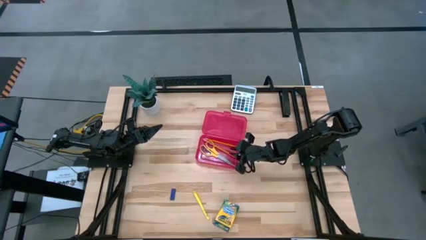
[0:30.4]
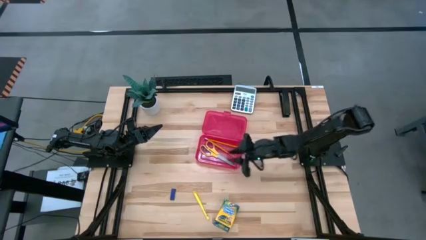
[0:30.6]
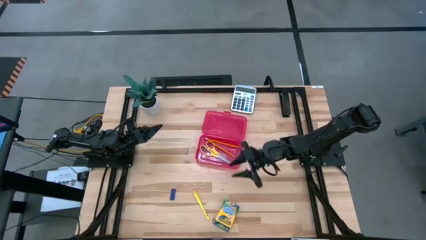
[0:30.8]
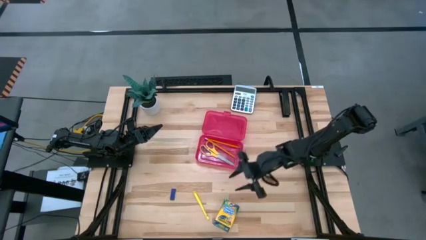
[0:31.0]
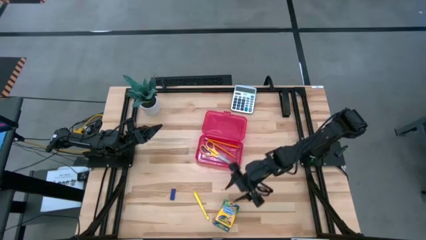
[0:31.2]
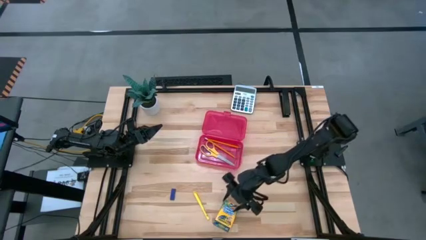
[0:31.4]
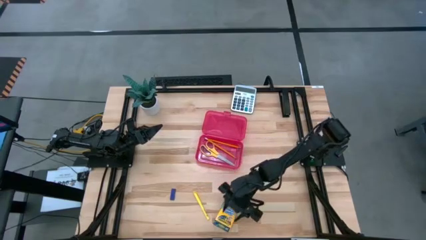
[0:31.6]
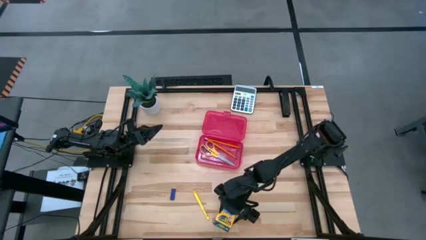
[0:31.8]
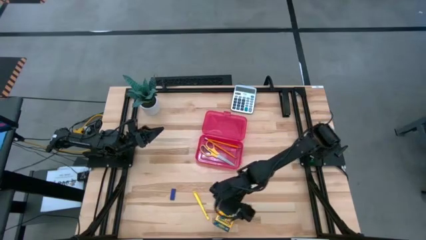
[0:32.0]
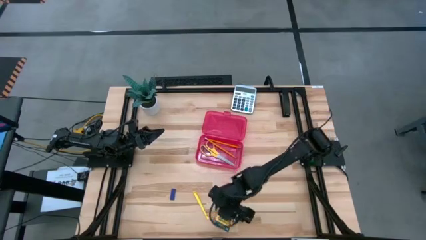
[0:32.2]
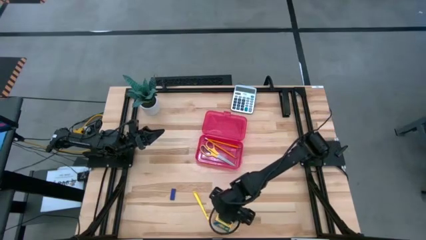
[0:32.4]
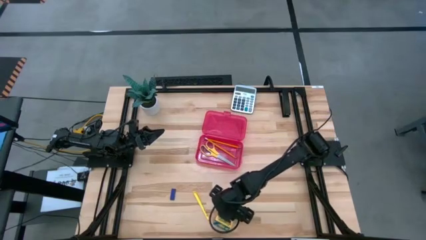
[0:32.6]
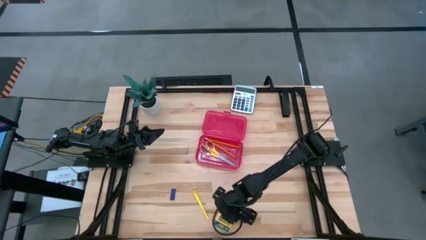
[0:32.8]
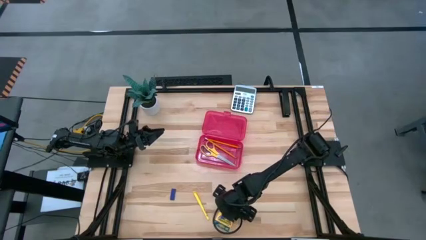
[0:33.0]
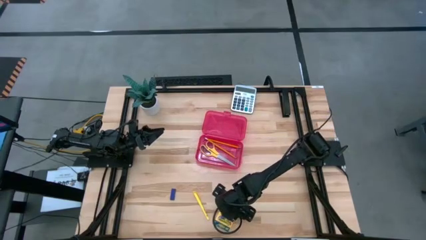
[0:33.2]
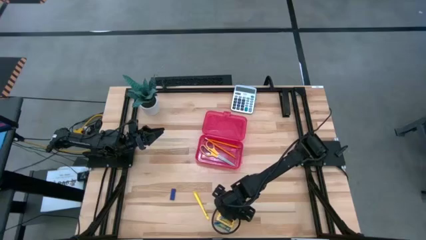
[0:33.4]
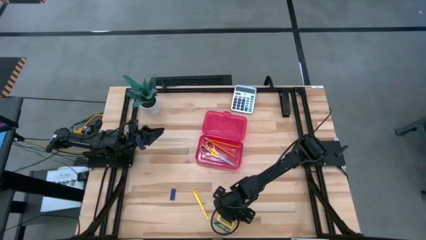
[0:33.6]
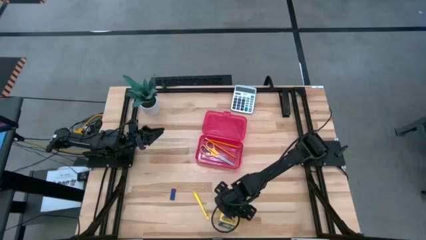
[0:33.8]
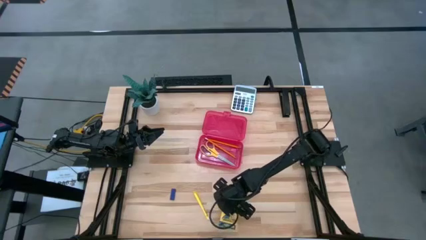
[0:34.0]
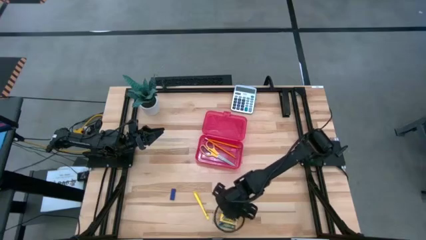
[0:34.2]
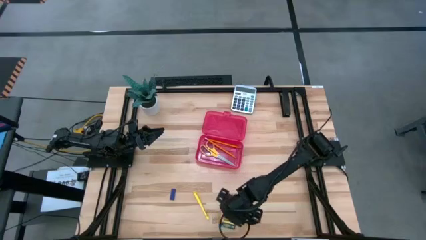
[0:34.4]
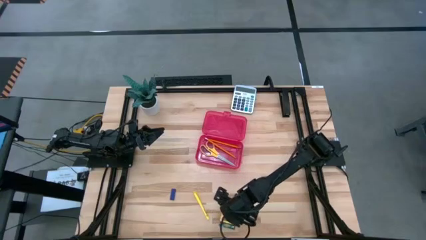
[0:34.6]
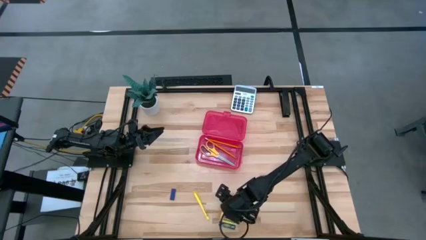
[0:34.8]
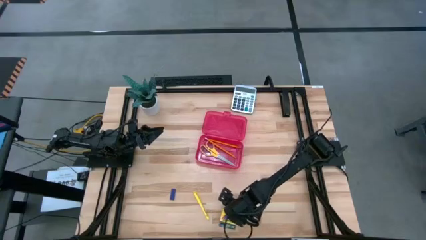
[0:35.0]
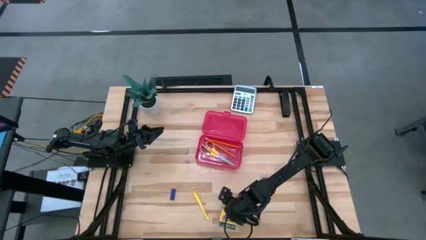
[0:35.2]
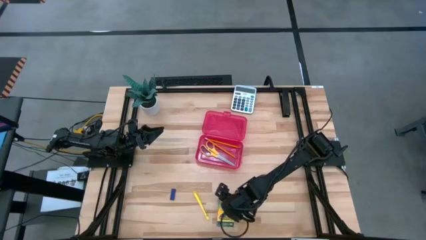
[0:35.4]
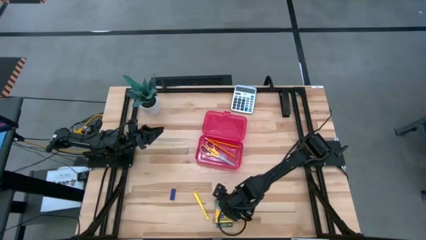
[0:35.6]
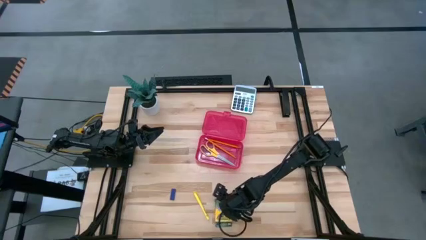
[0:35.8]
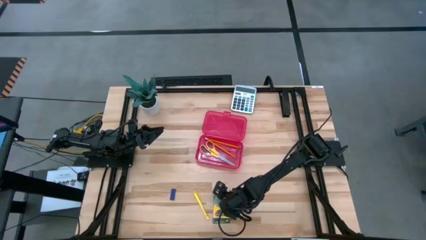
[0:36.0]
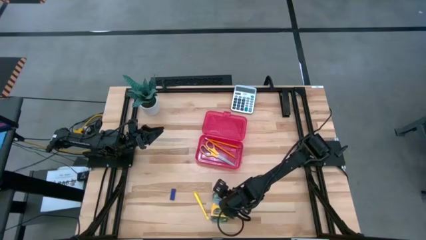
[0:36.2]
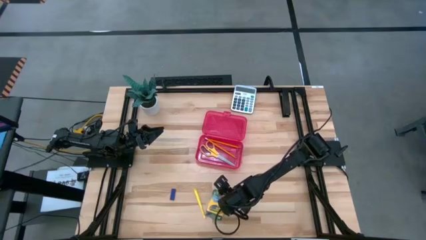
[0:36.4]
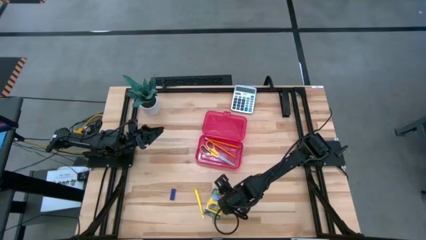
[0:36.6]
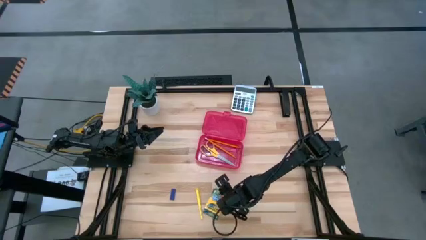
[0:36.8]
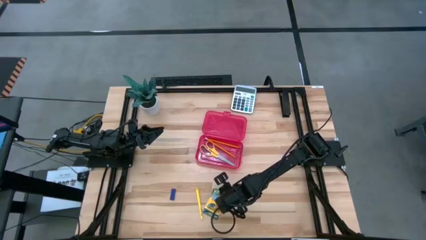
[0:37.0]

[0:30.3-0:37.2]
Task: Pack school essentials
Put the yellow box of crayons into the red supply box

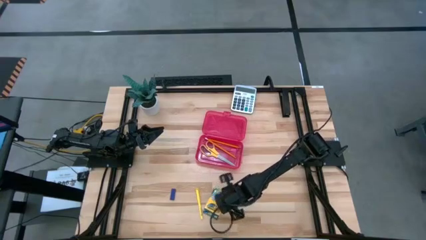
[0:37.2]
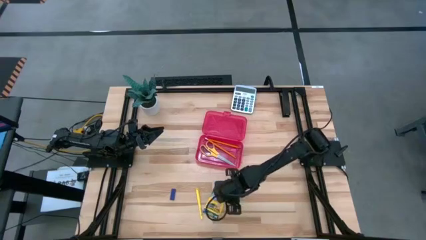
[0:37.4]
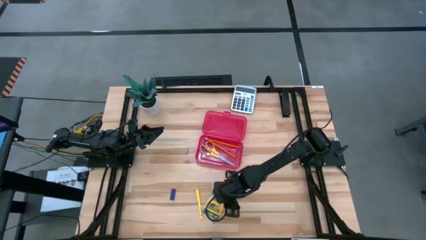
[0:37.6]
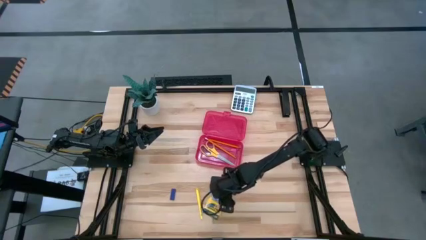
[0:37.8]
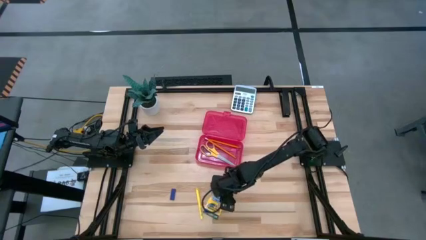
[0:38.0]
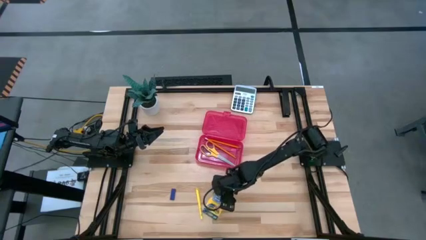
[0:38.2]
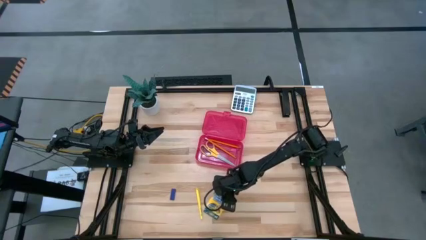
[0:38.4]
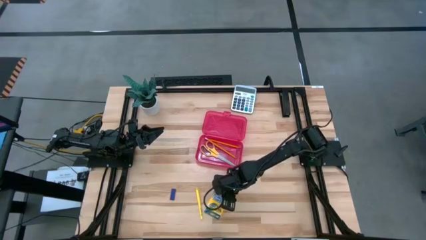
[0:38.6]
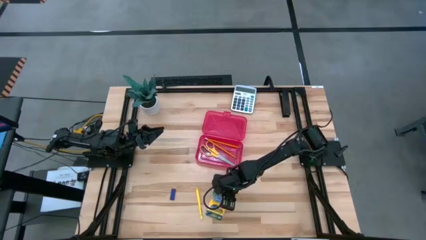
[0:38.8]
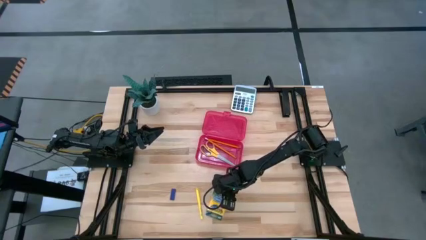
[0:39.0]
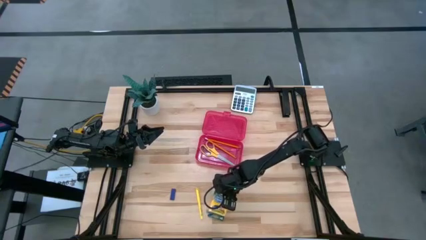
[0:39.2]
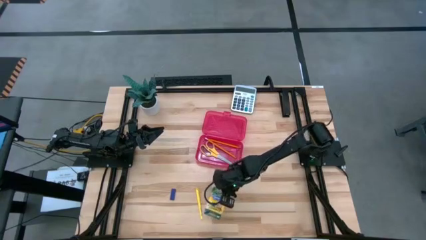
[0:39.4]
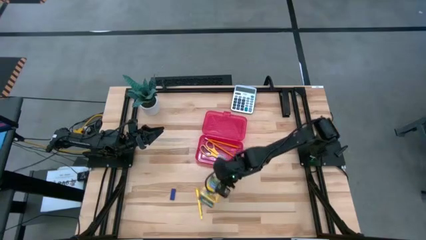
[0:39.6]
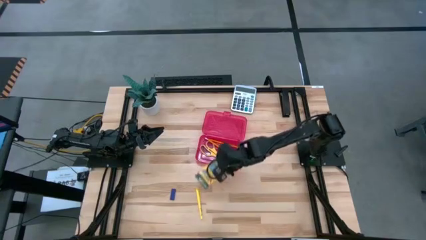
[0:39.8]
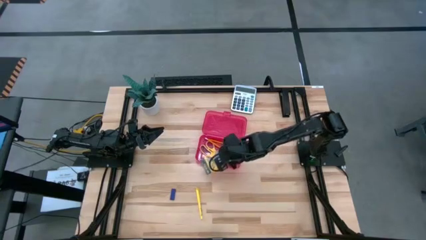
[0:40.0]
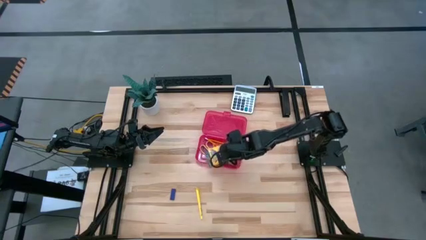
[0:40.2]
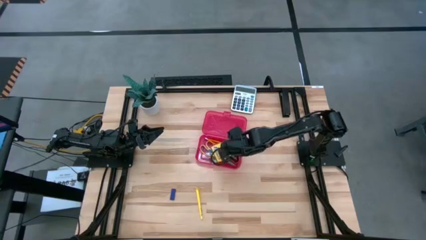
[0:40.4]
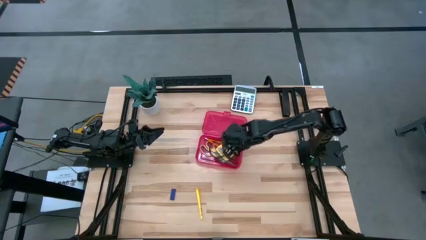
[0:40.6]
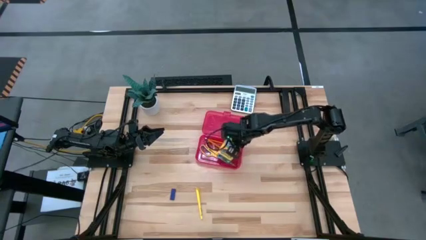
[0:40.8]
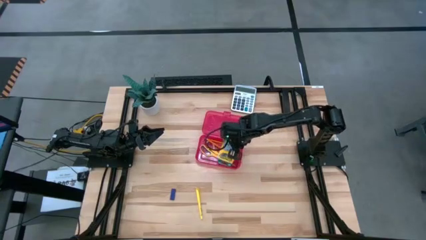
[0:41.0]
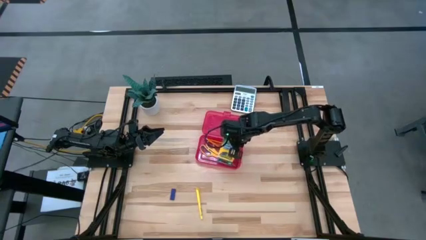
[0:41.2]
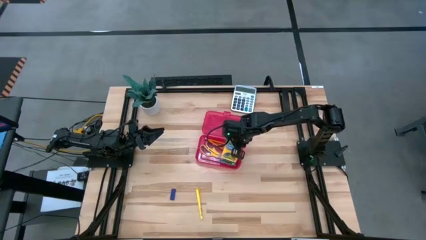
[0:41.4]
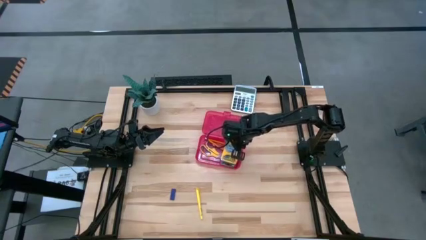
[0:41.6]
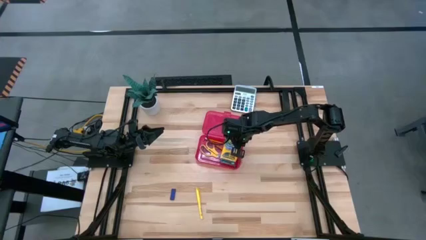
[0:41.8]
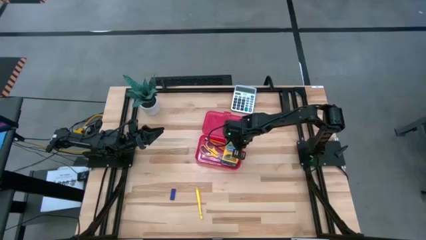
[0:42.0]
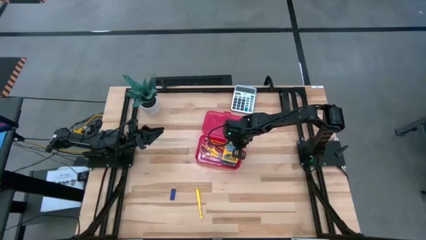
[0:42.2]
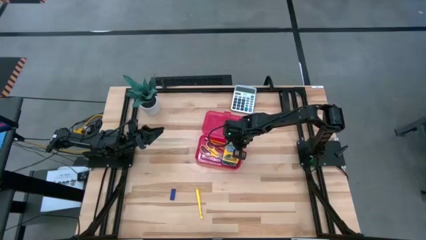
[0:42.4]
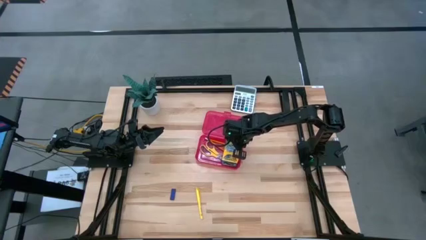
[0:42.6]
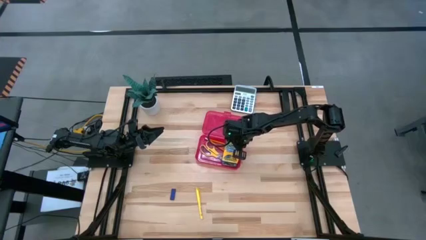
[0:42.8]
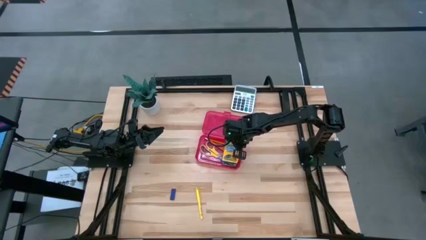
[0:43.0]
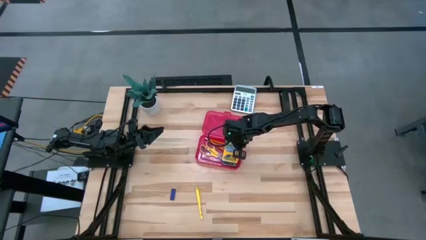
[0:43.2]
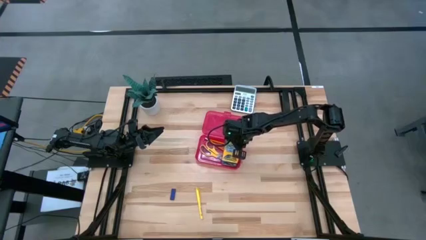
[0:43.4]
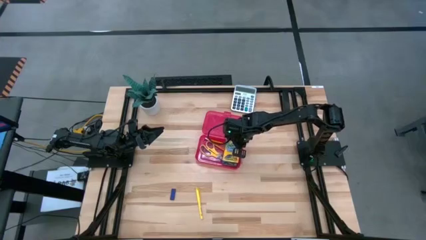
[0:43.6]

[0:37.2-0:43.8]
Put the yellow box of crayons into the red supply box

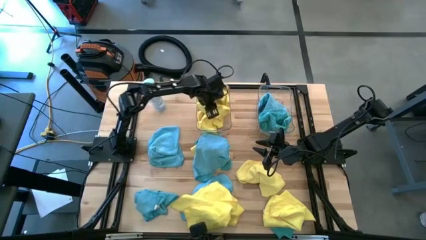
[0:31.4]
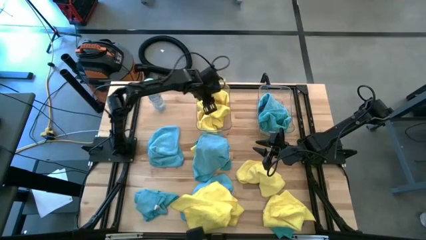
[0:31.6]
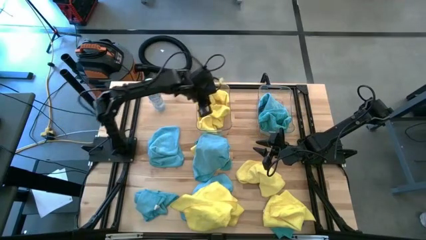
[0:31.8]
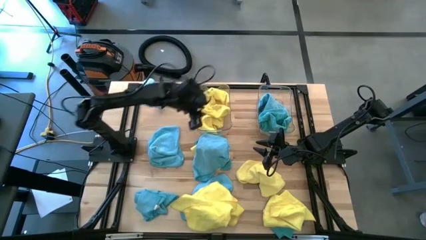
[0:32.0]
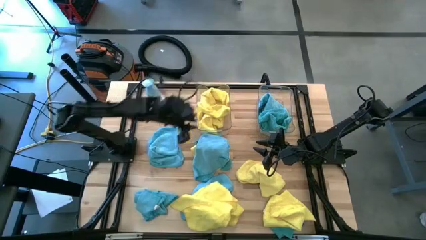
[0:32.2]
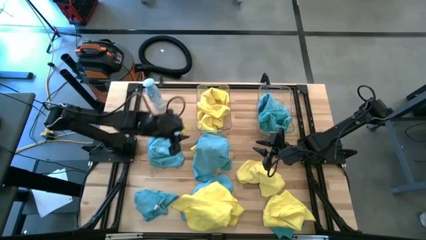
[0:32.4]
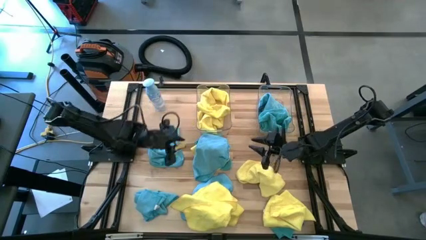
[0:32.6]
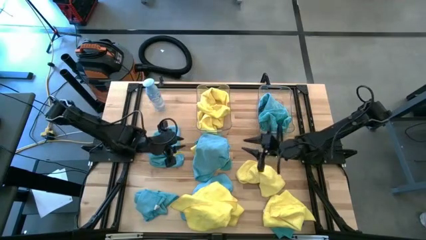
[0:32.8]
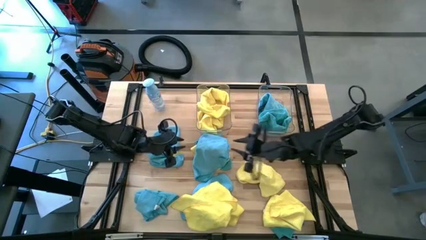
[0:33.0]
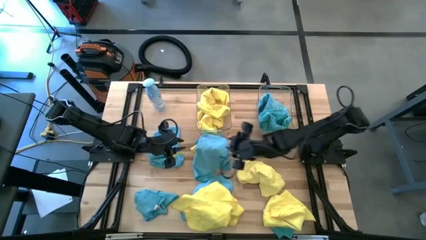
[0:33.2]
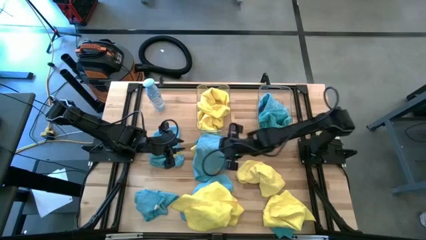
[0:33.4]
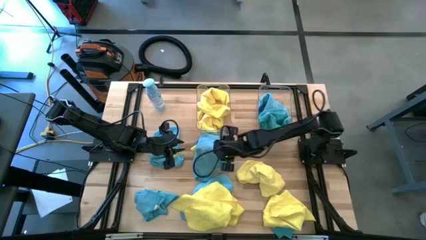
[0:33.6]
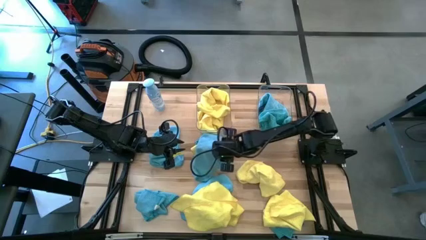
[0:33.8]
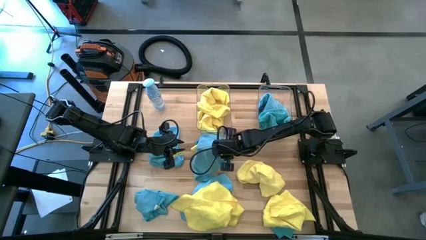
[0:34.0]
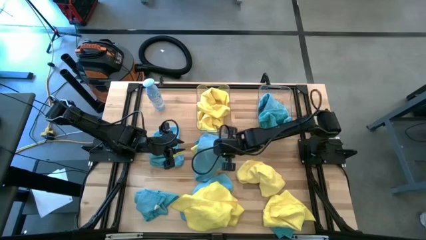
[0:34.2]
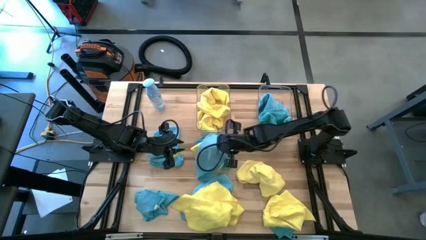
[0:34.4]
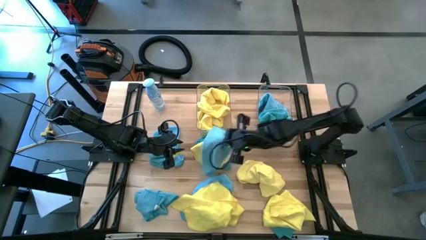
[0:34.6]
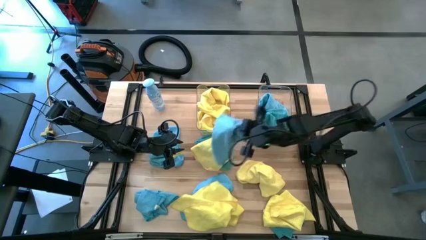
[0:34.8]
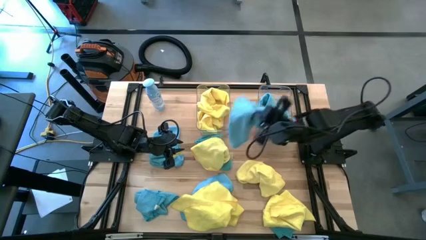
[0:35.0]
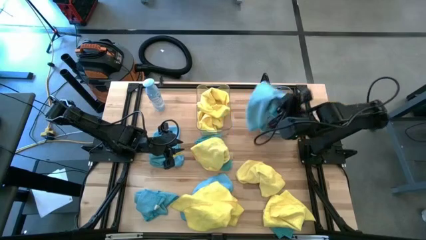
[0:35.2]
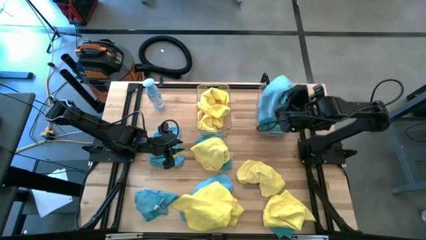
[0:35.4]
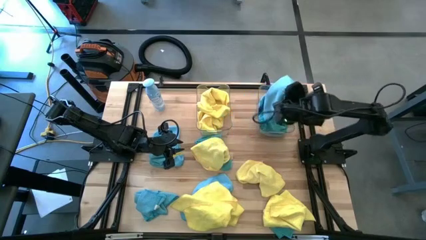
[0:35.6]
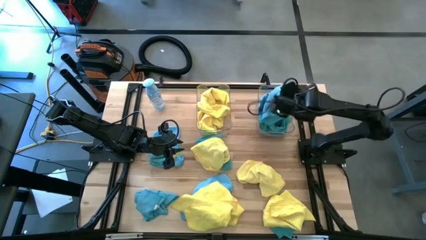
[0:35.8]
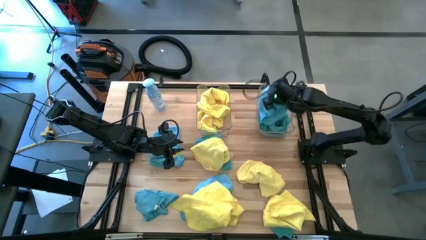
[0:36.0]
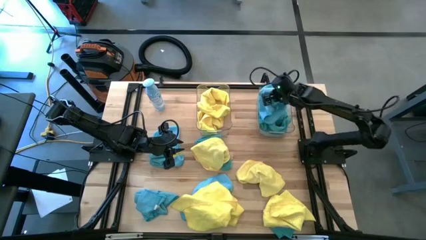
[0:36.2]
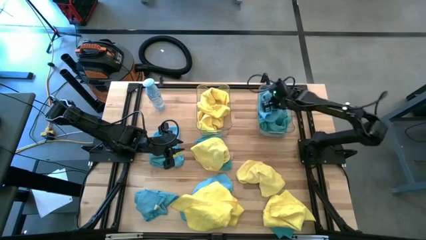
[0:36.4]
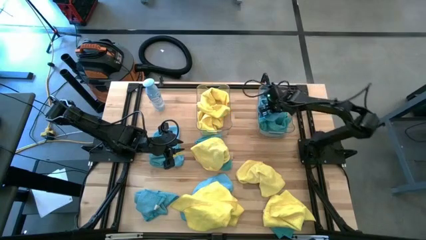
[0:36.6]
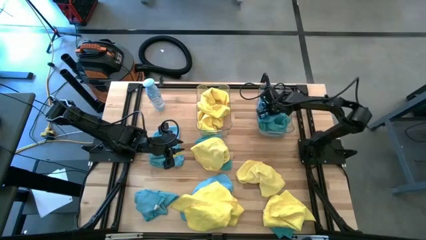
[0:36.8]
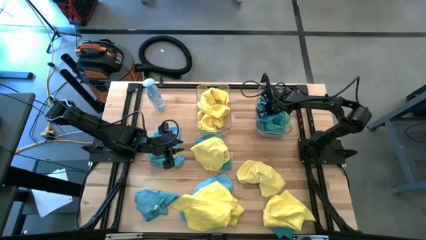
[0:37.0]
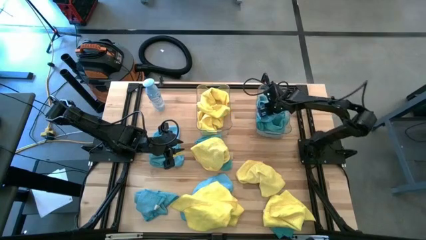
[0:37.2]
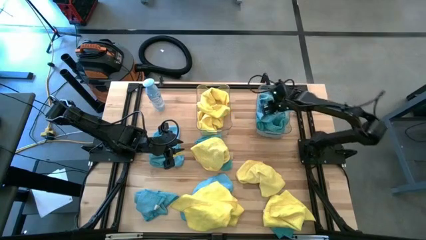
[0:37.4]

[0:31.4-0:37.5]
Task: Sort microfiber towel by color & place in baskets
Put the blue towel into the right transparent bin
